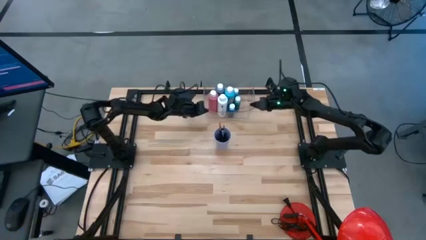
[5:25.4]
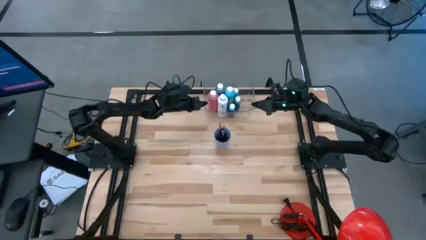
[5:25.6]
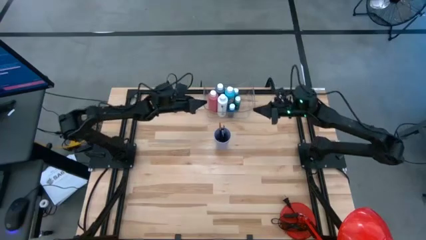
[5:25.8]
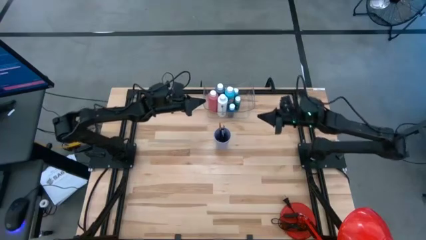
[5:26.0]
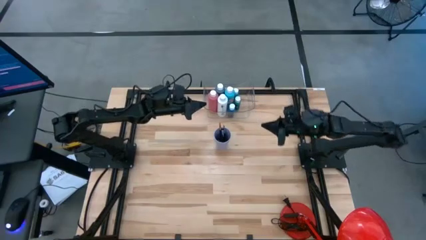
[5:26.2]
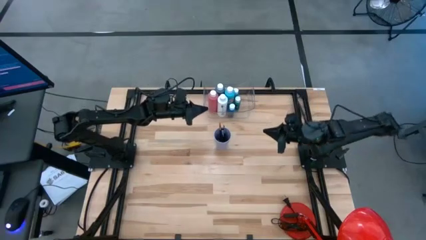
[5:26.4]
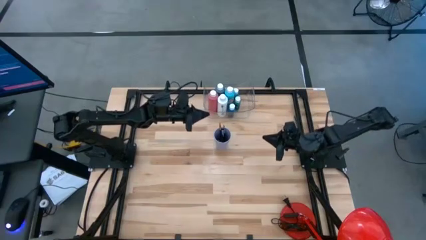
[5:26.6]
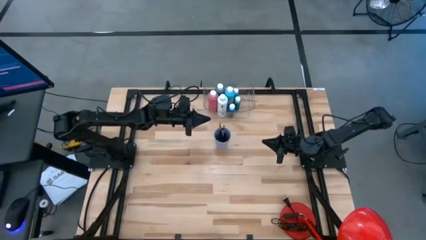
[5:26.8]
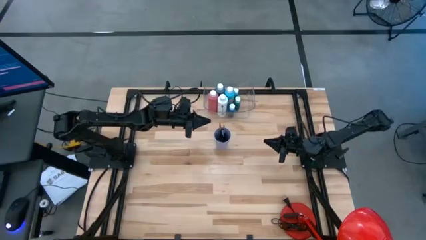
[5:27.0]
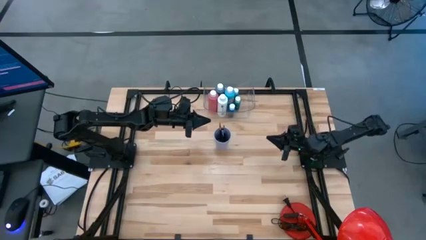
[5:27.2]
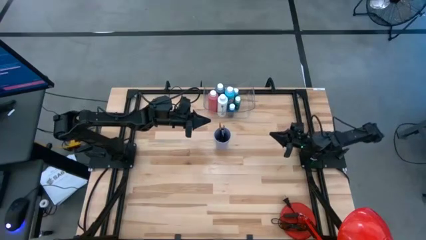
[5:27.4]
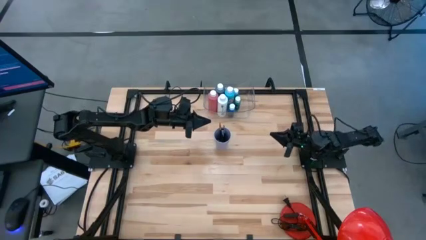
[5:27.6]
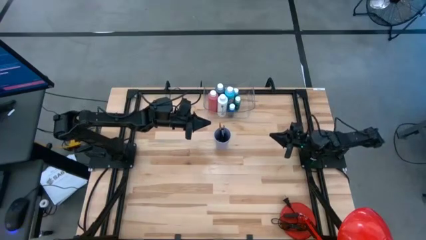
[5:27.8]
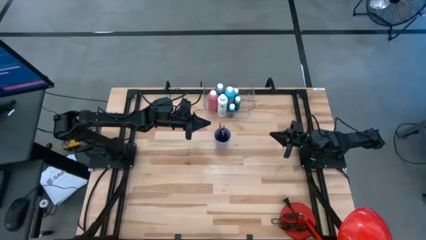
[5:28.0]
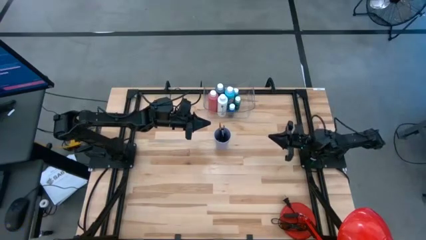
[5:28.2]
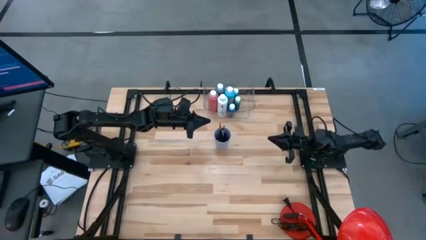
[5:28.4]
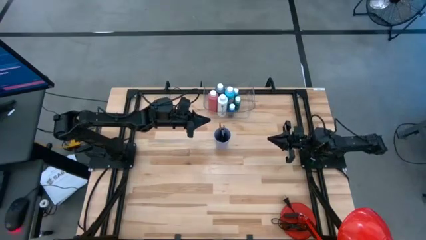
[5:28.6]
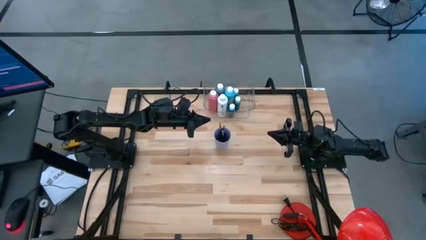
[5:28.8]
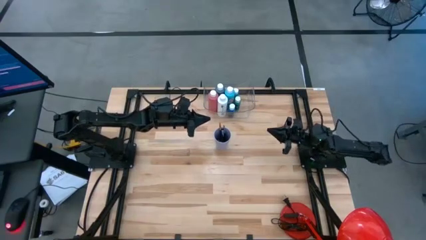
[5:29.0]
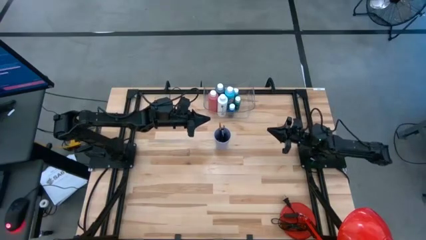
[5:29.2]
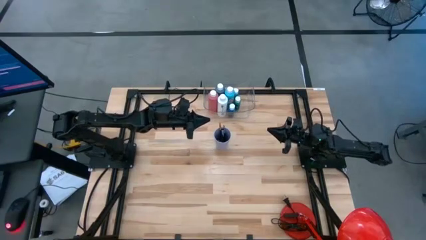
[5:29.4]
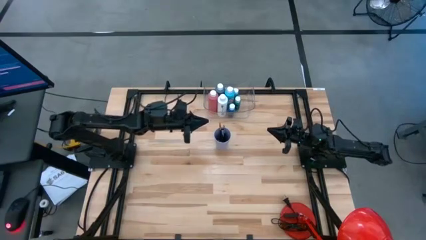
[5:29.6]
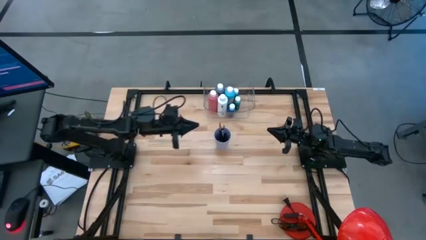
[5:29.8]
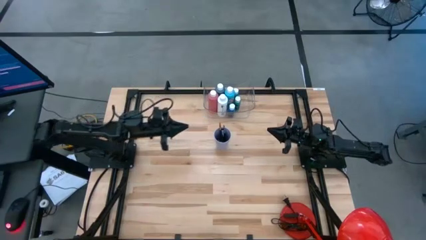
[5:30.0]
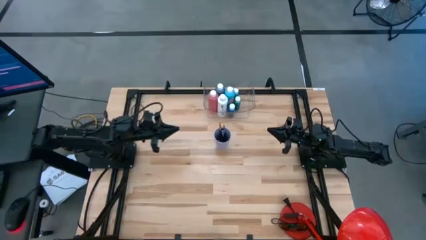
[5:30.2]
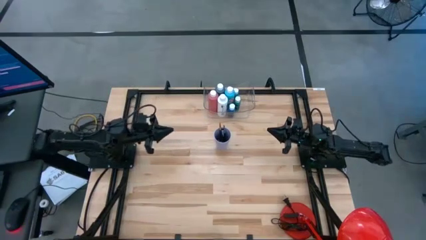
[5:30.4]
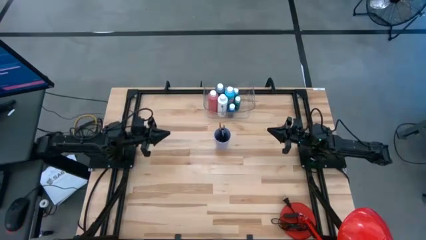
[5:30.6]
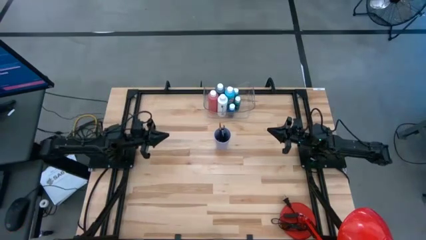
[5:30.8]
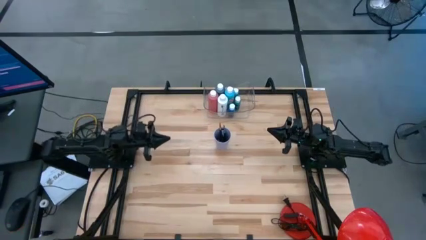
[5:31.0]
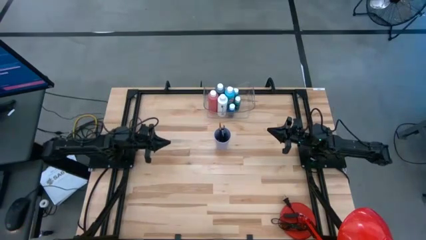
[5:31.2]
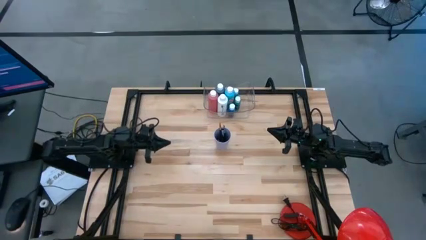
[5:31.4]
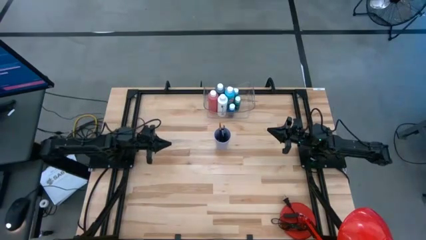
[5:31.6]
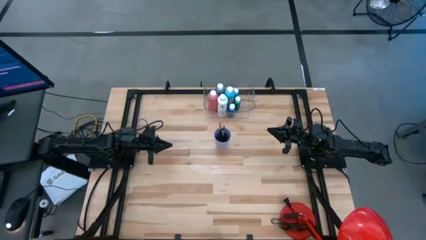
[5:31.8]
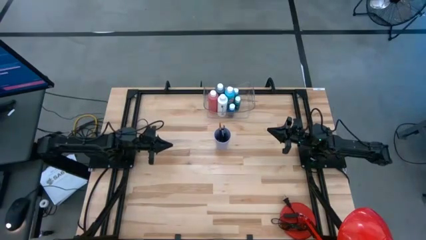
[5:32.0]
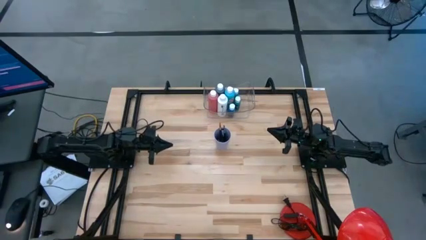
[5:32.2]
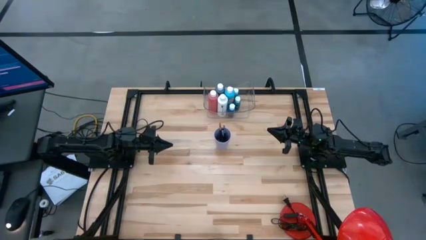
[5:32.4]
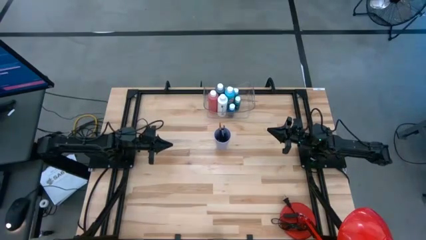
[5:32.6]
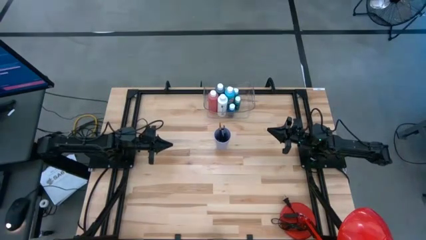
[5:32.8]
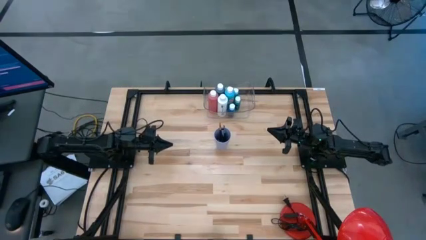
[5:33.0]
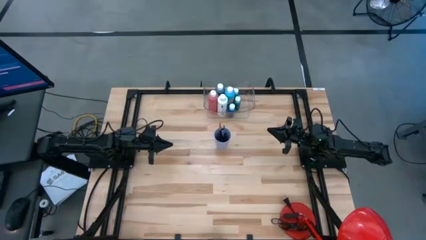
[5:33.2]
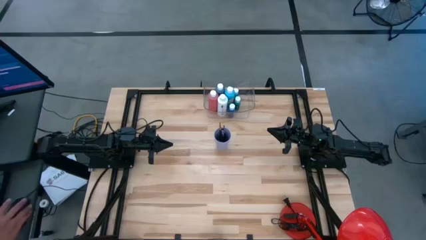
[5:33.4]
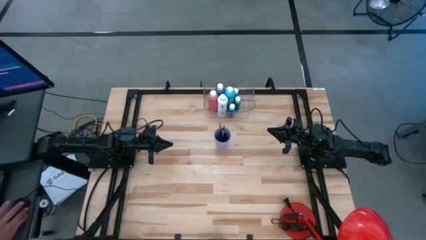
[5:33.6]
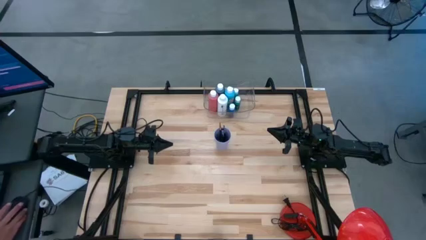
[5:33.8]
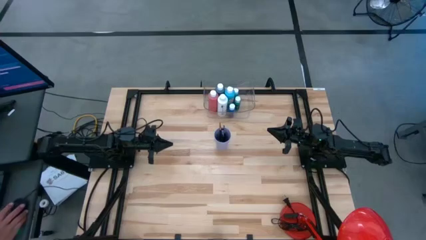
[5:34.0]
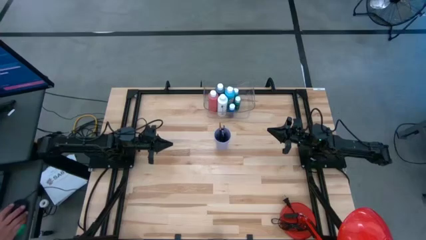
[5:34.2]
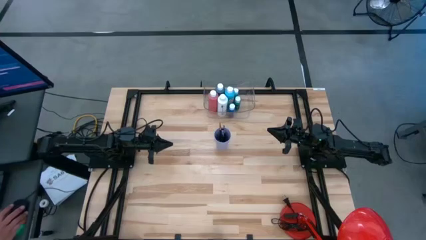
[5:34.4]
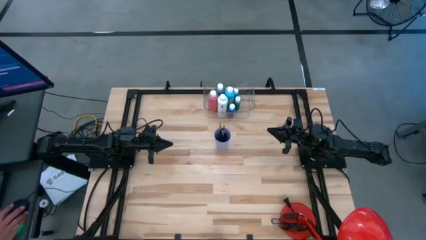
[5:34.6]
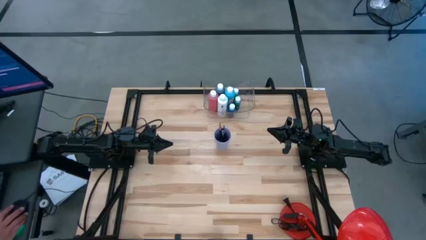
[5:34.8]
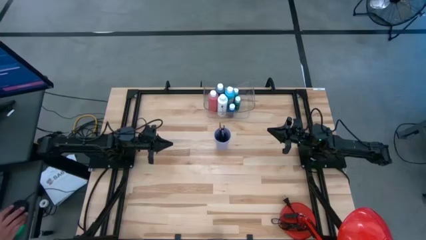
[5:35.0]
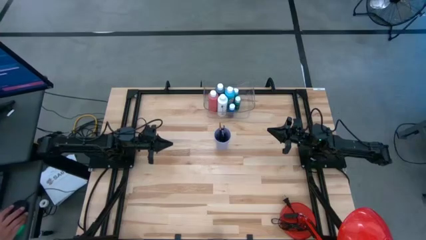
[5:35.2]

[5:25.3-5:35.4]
Task: Pick & Place Paint Supplies
Return to Home Position

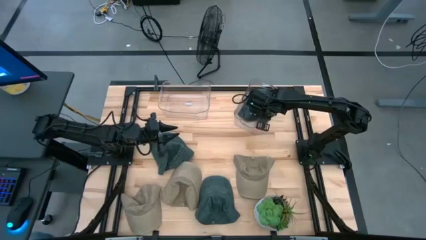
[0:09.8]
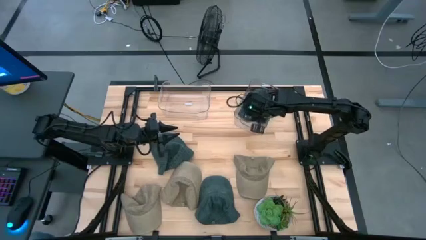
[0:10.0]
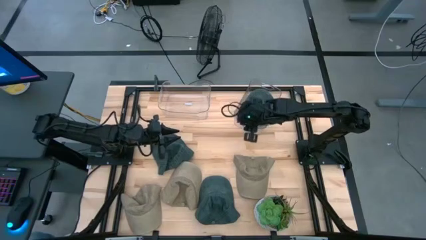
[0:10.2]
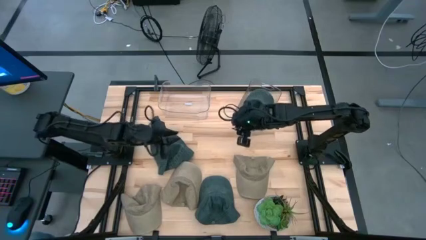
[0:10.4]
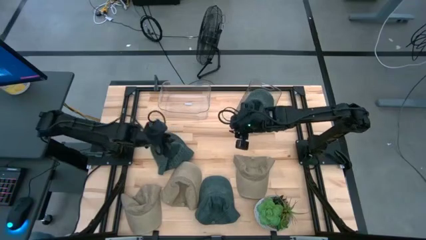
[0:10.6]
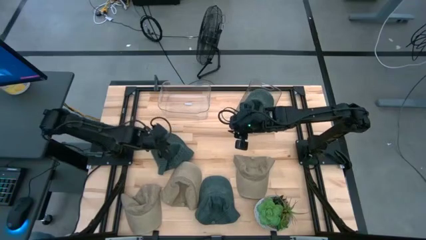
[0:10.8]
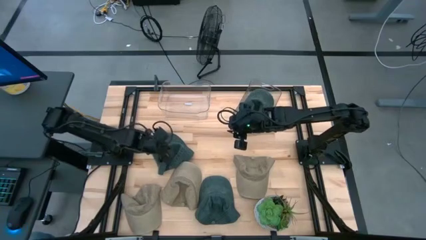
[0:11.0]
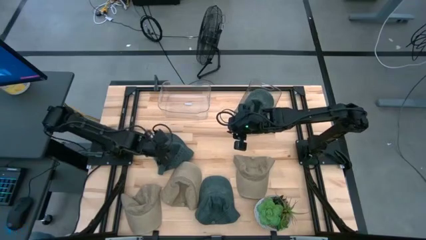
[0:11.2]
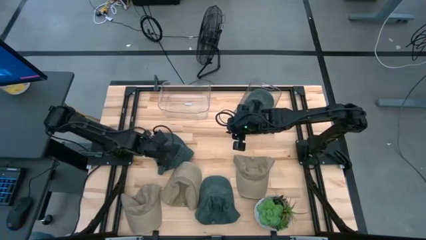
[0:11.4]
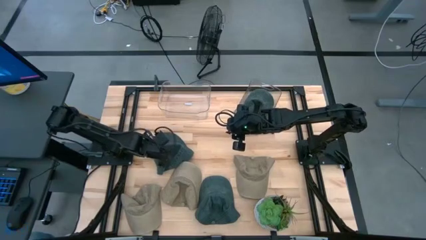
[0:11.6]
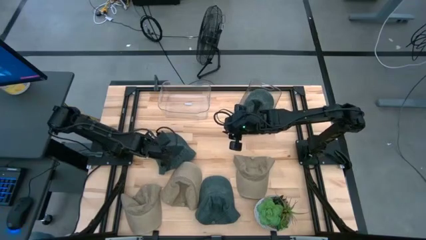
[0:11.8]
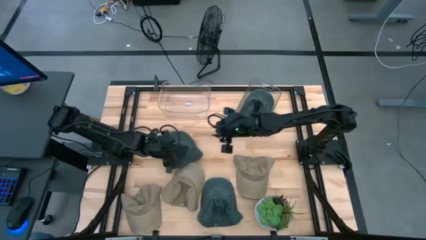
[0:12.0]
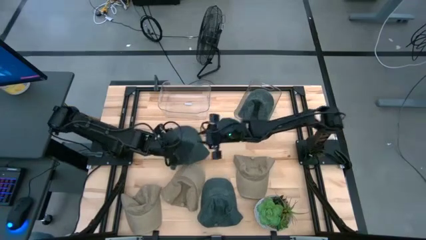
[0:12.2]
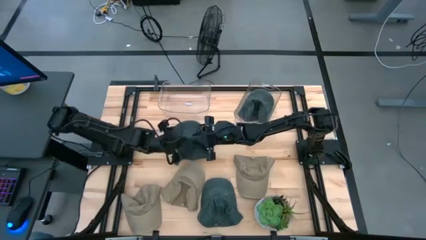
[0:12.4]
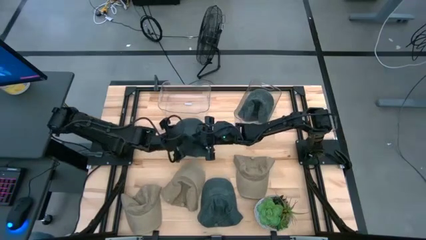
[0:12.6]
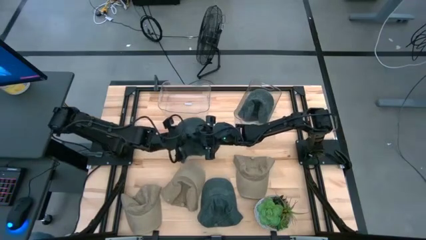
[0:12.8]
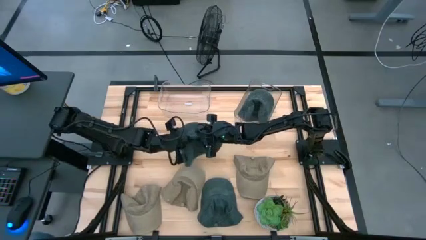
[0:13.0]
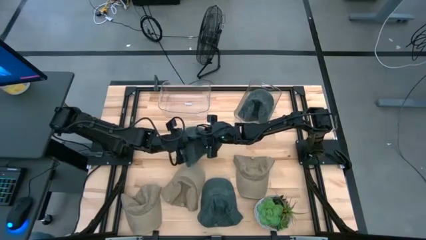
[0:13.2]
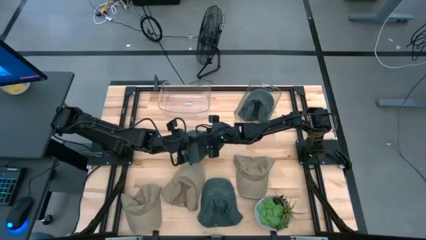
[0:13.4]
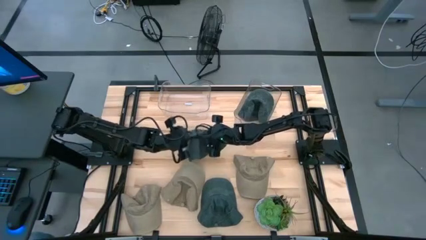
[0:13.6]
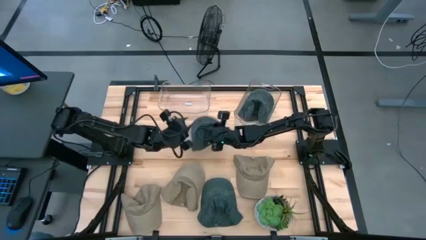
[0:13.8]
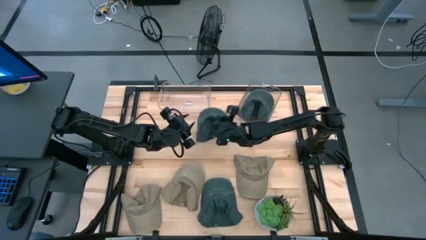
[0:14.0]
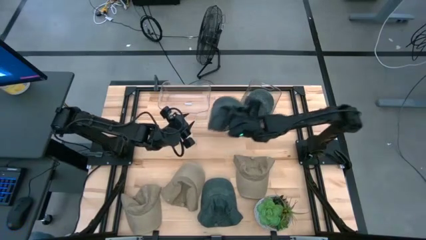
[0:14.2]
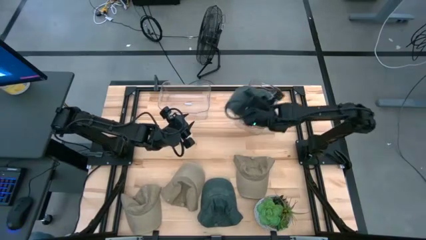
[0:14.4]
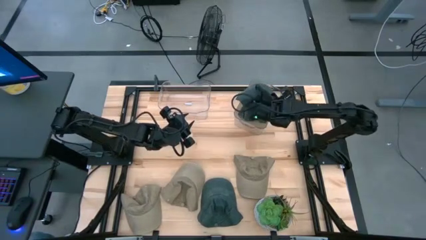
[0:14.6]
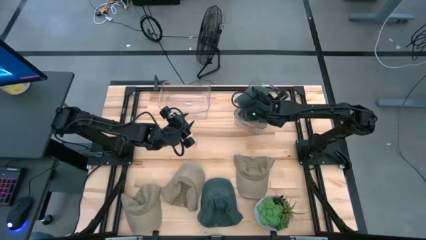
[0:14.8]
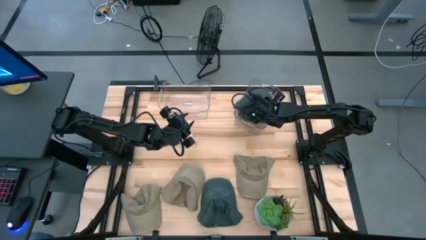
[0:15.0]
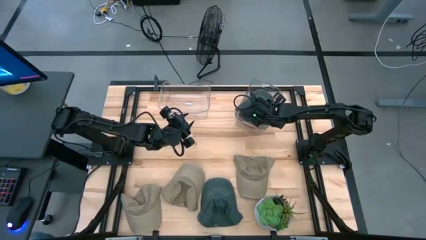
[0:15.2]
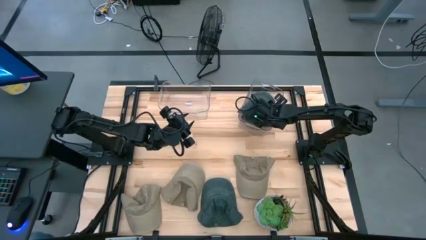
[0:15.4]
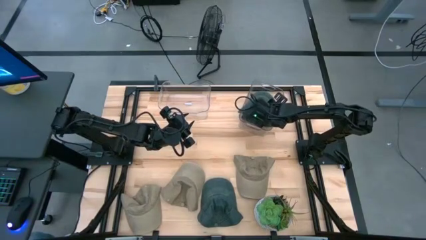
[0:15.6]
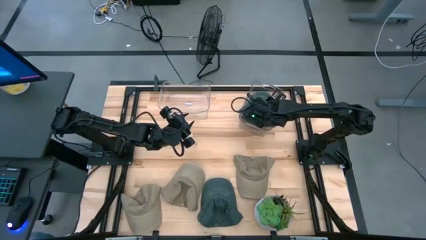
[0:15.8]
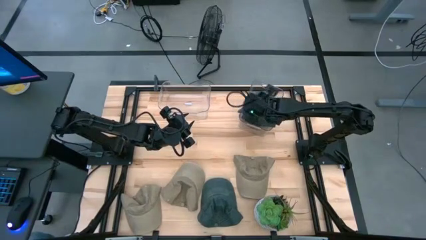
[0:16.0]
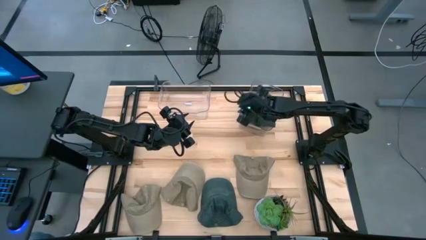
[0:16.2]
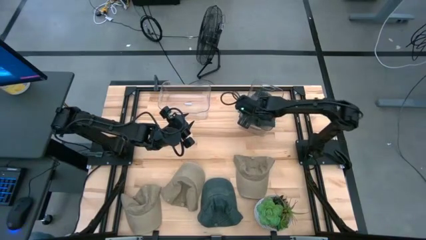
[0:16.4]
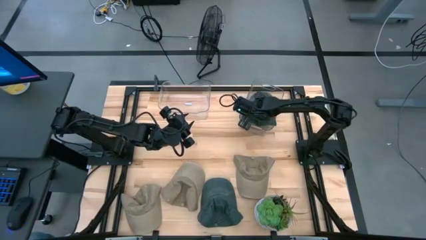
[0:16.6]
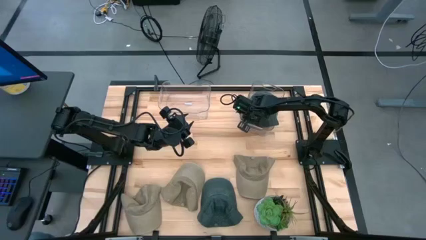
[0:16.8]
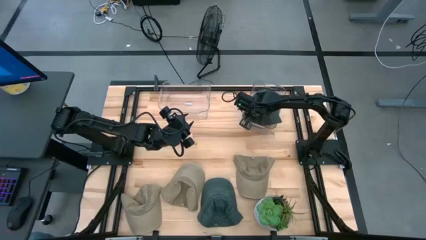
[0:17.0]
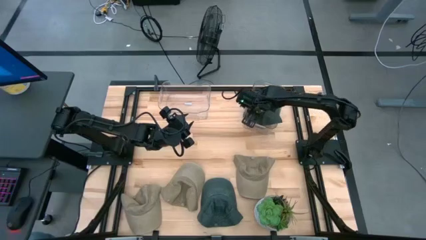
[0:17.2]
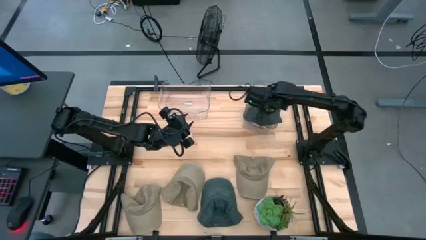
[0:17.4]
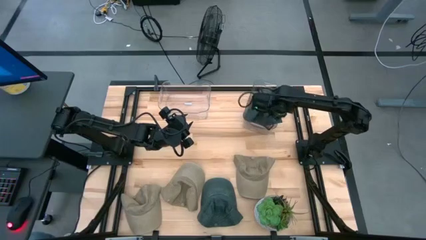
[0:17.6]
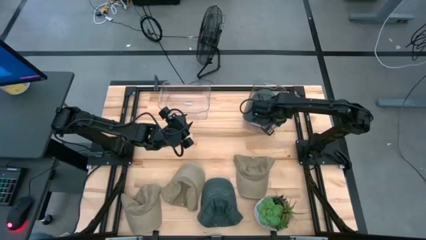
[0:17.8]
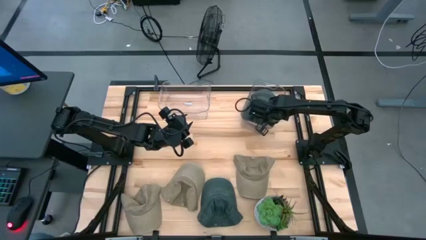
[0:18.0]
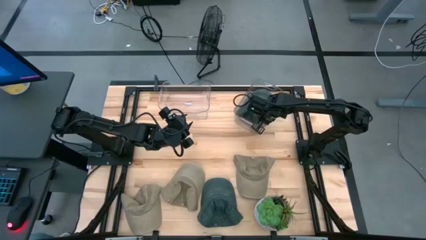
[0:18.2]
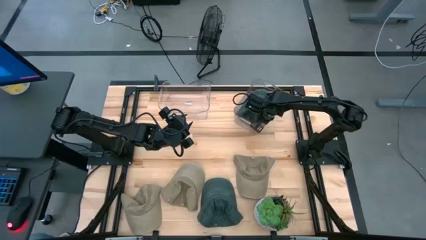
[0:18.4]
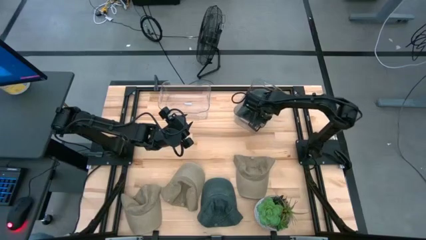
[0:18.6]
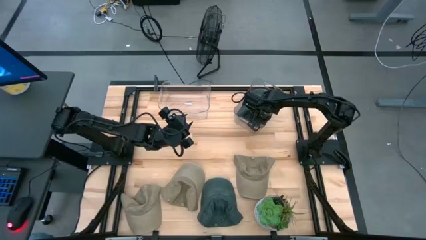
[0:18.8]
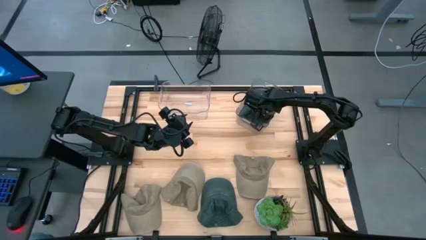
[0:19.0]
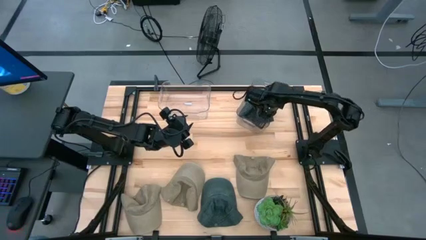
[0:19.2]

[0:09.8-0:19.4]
Task: Pick & Place hat
Put the left black cap into the right transparent bin
